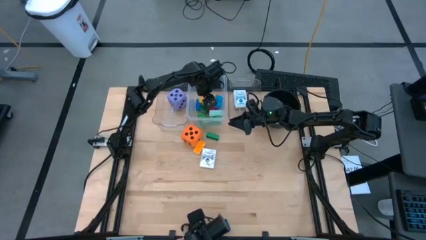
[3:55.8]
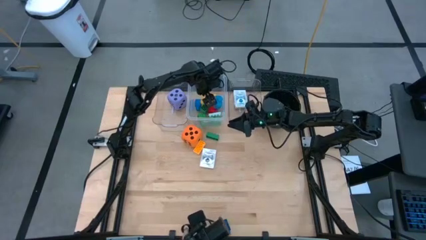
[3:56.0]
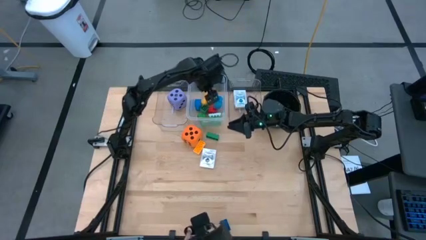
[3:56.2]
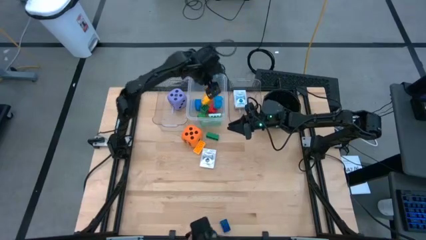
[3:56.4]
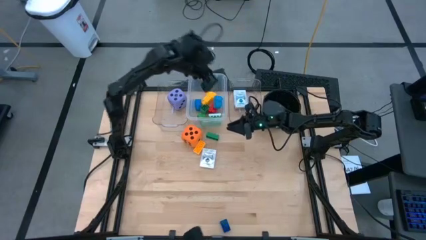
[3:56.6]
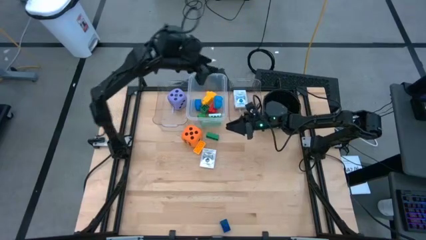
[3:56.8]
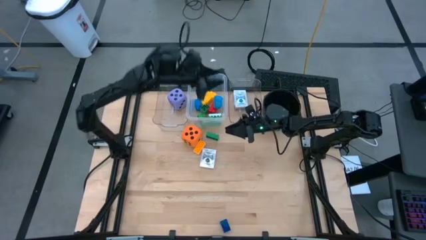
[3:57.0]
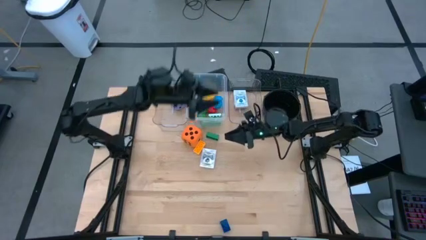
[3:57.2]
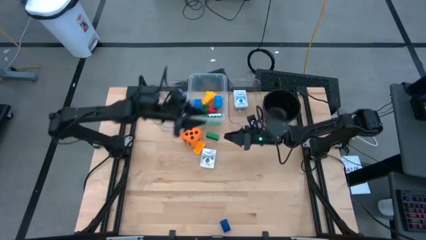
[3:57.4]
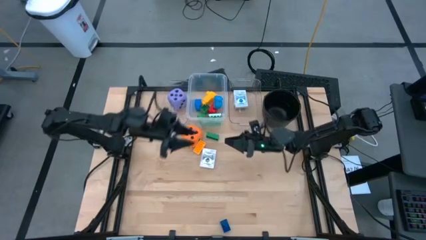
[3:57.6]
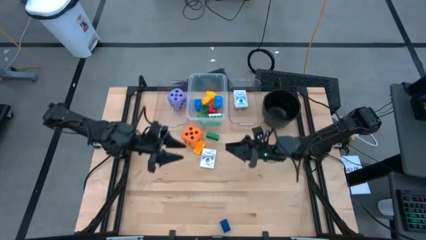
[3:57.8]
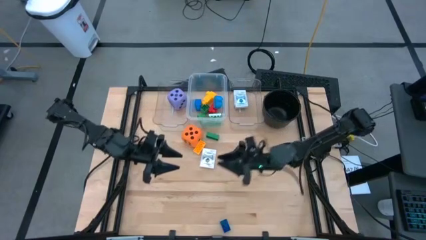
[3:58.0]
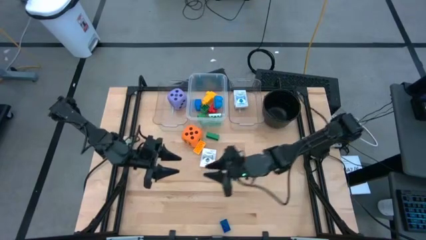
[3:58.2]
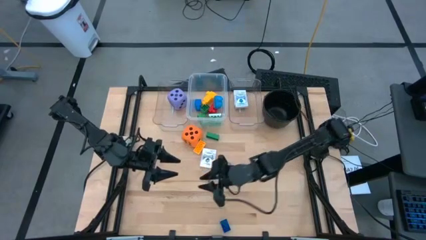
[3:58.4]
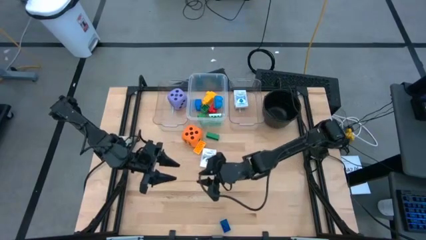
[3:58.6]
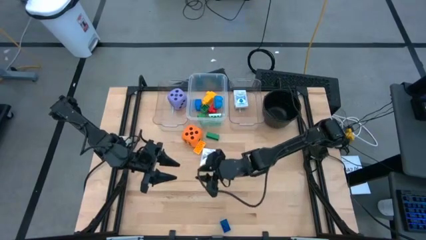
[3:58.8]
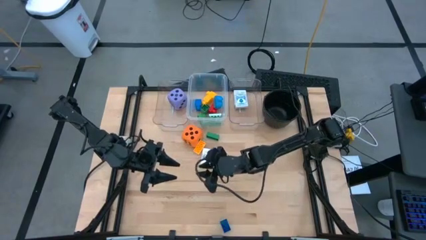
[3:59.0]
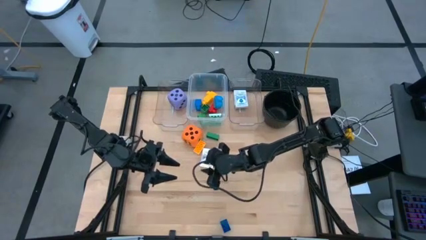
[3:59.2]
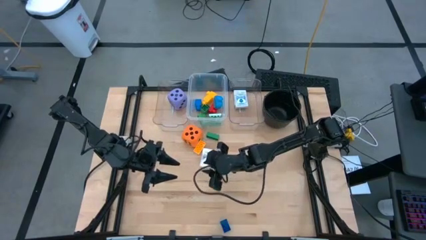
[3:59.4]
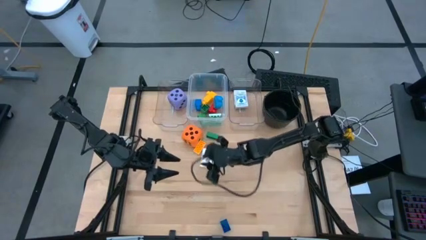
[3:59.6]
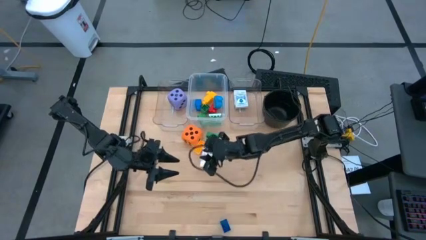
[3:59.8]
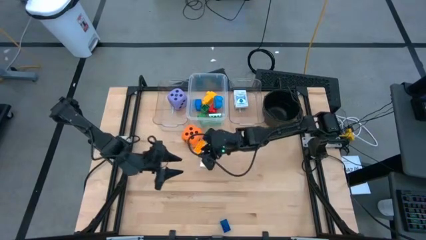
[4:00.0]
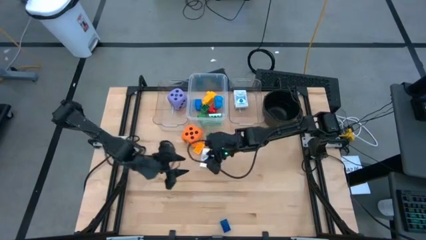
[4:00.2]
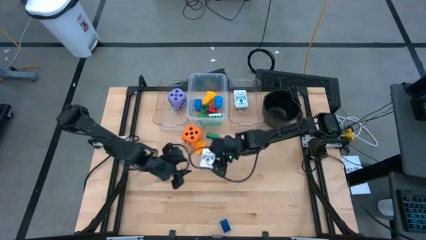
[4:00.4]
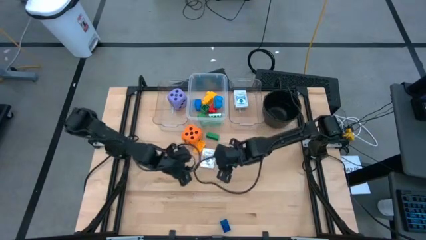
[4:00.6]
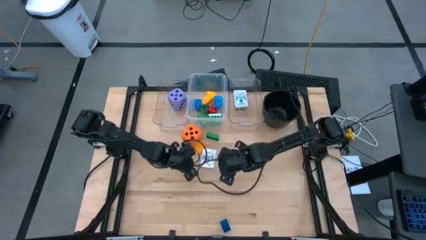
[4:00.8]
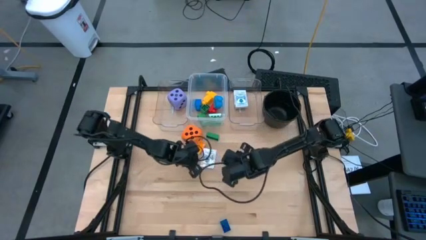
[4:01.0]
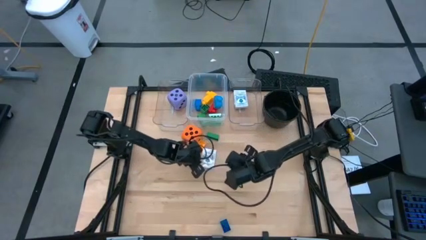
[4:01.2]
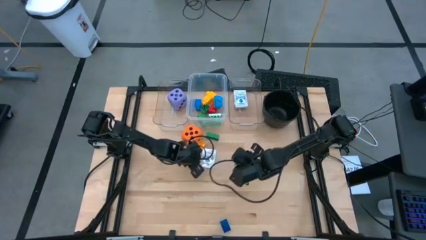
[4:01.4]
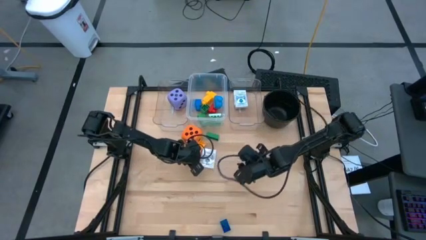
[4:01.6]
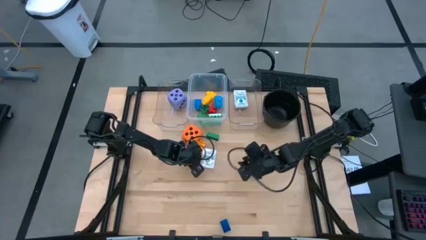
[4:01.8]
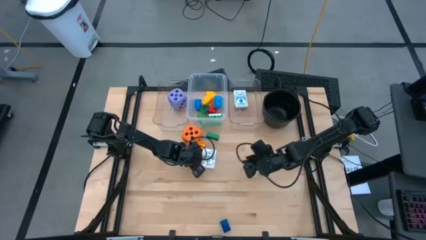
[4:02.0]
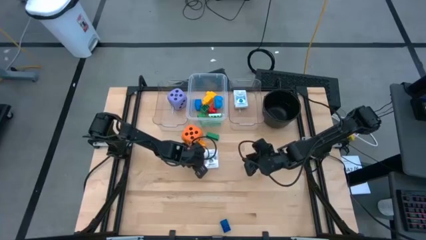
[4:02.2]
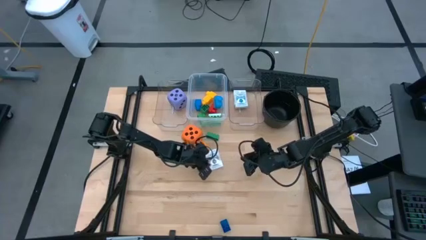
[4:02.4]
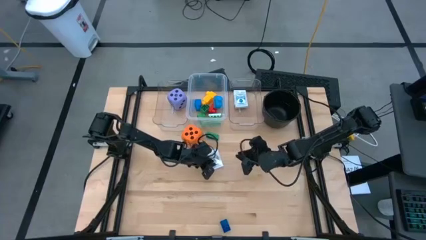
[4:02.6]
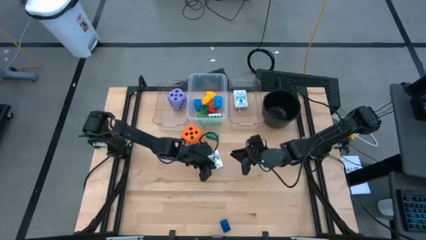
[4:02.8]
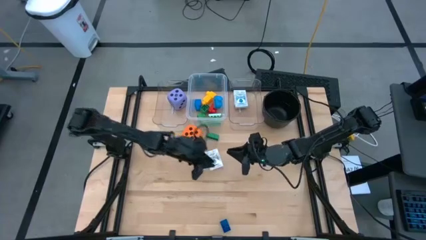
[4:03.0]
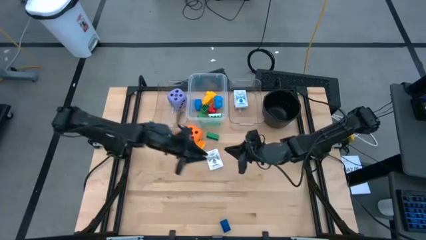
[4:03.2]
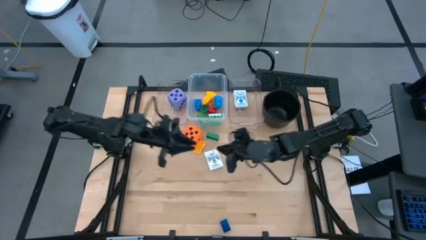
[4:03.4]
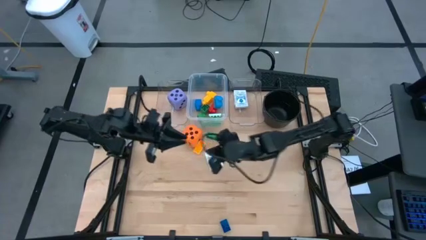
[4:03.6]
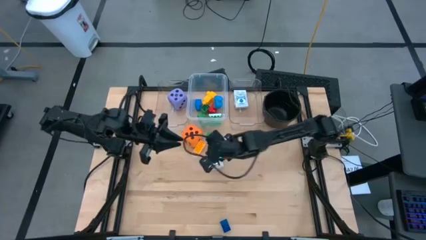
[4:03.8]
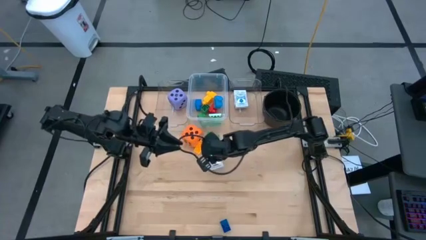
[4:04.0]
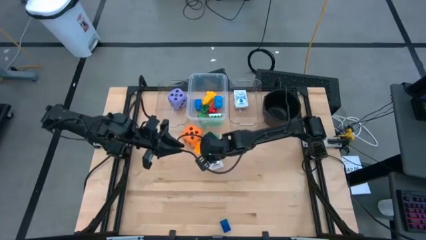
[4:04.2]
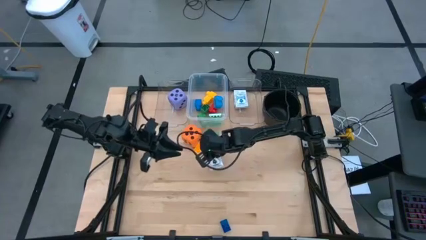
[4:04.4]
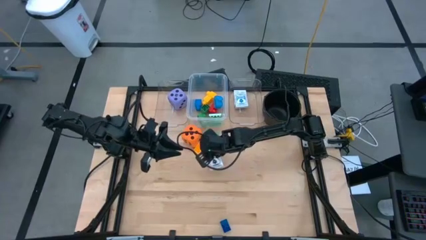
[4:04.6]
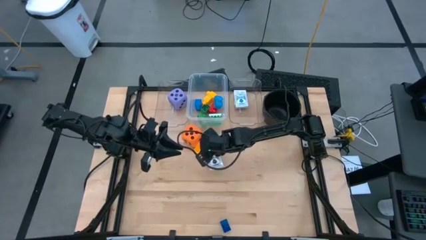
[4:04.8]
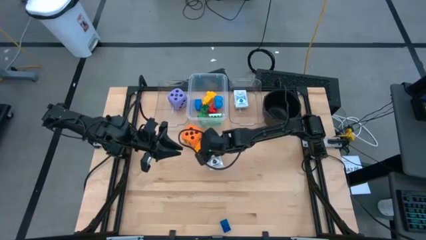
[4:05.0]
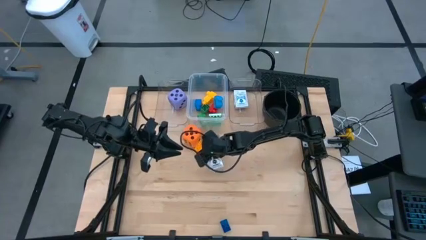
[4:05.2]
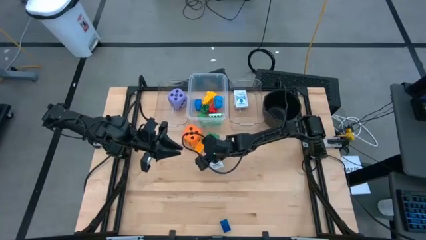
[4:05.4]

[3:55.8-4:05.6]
Task: Pick & Place Toys
Put the black playing card box into the right transparent bin

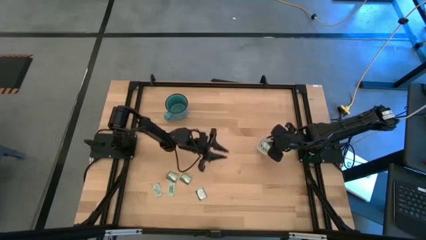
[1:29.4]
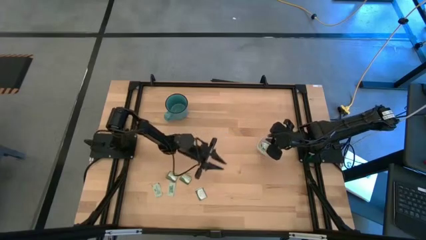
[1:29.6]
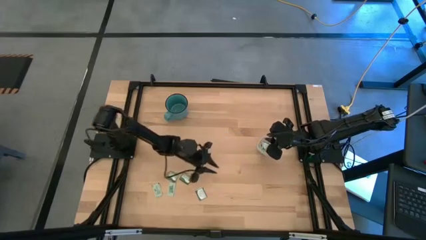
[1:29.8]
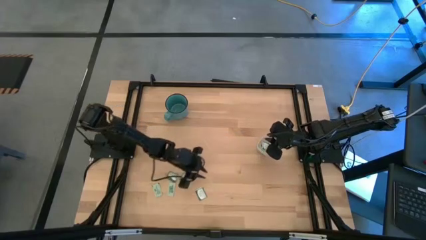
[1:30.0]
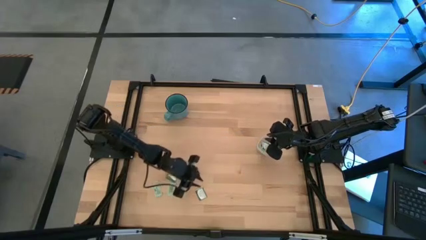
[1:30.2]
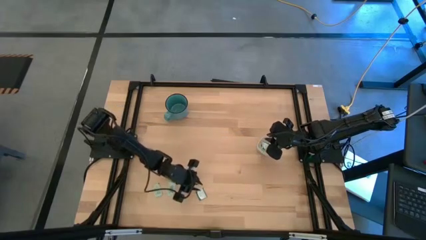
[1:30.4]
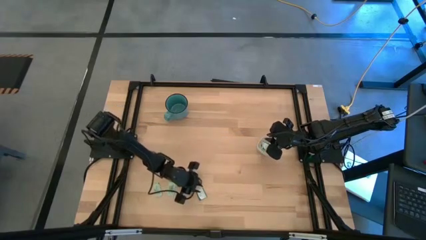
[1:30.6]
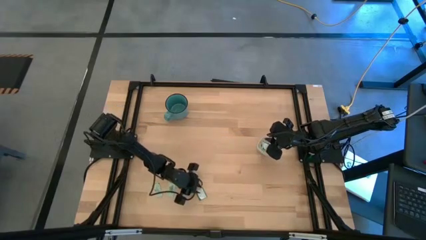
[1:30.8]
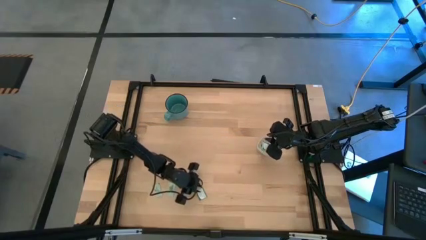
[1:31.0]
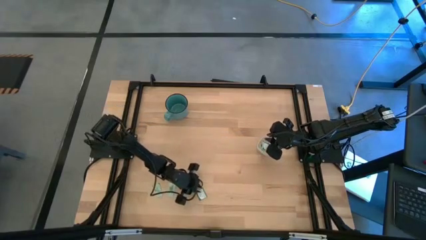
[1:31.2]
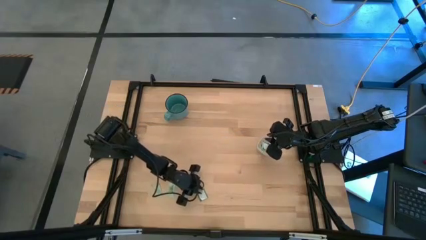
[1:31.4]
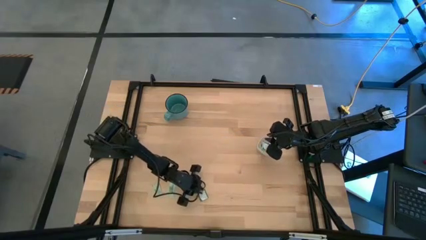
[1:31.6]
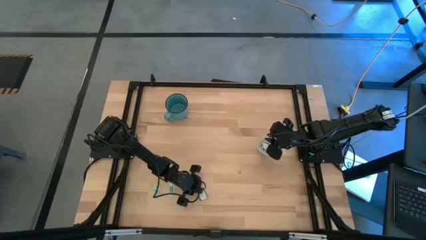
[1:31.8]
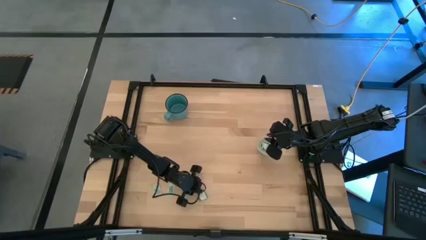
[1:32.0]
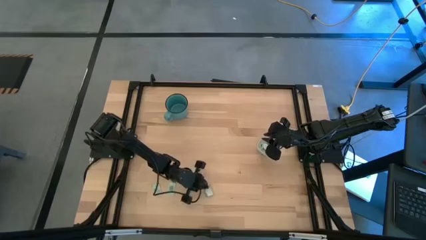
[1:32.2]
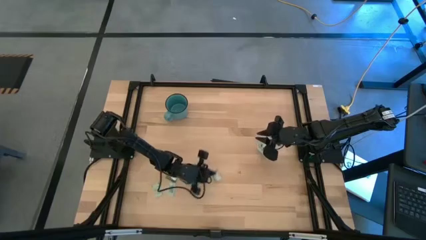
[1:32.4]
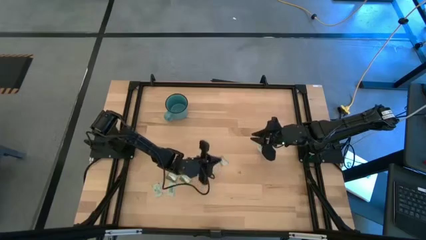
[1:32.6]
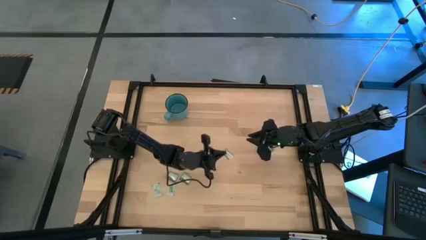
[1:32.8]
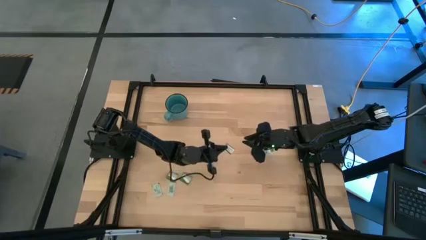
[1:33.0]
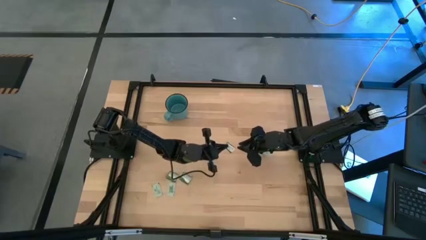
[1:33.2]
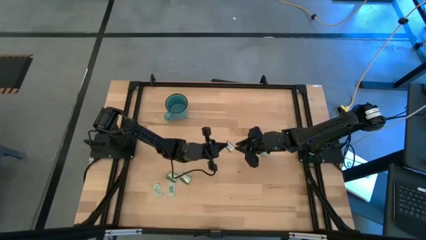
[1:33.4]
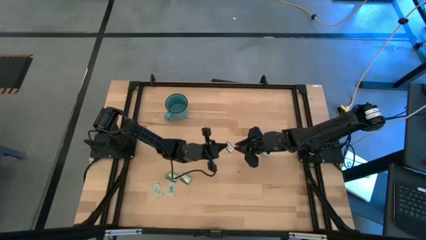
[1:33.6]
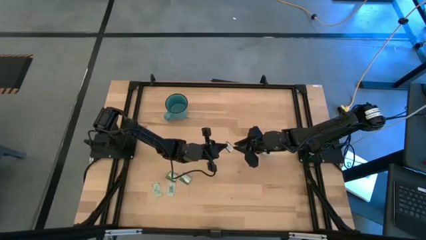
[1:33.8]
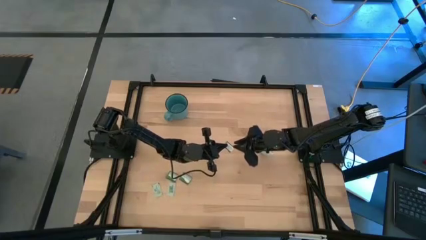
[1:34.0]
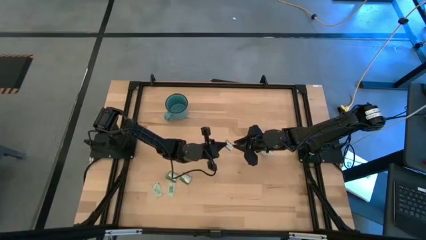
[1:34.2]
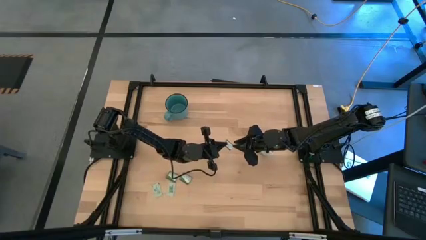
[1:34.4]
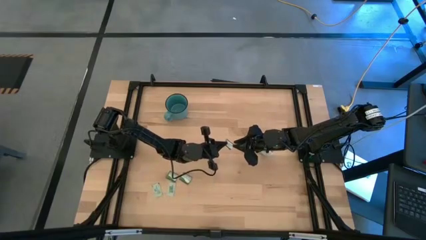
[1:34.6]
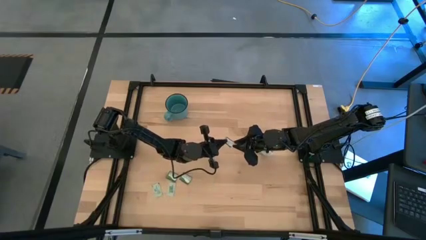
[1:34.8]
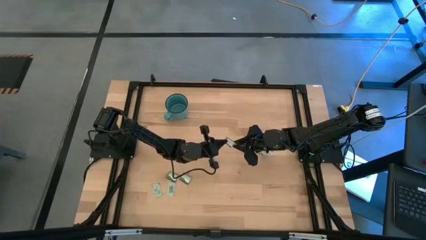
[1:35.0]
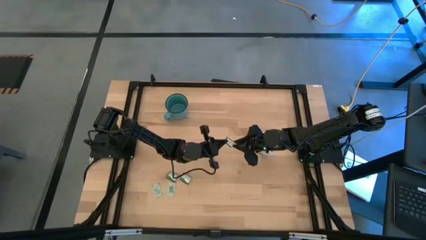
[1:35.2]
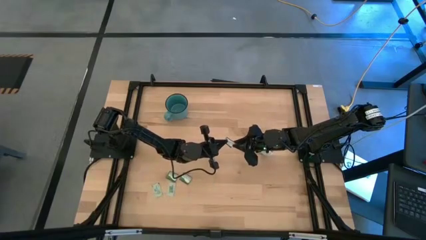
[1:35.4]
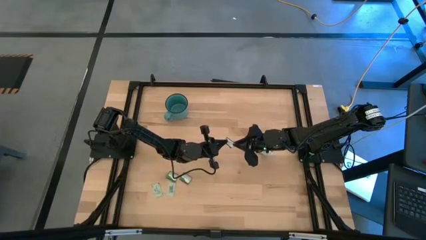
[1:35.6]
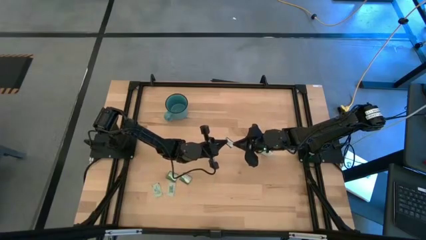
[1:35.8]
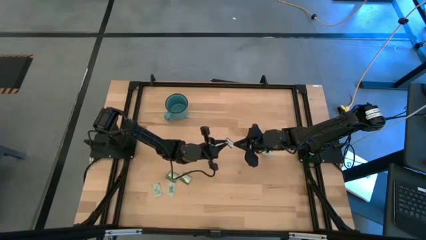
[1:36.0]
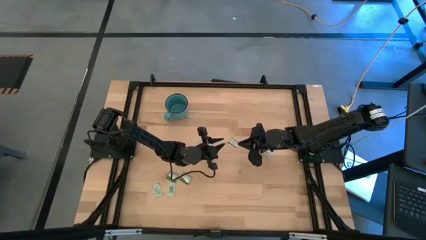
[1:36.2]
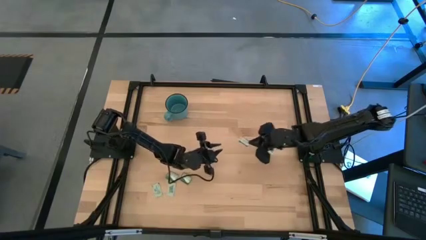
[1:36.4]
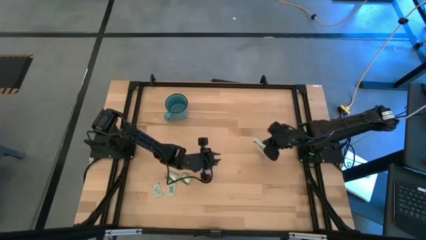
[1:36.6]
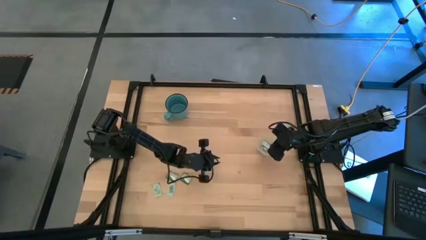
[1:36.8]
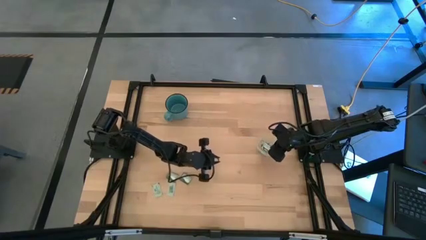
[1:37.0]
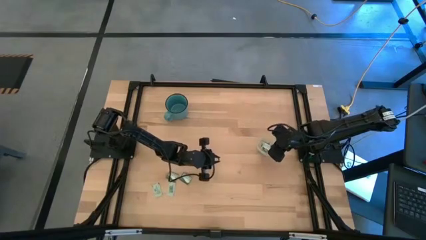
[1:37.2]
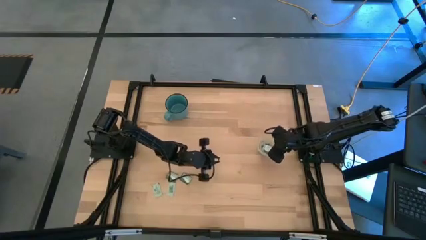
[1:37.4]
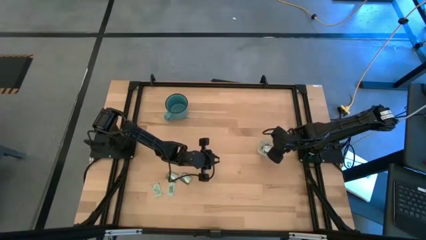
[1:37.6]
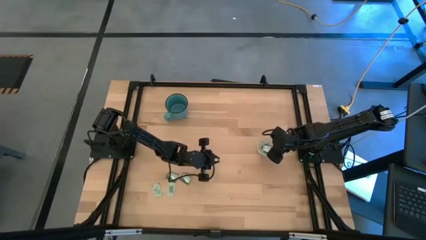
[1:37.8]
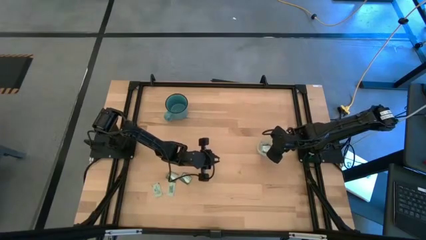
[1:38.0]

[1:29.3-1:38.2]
Task: Pick and place Stevia / Truvia into bins
Put the truvia packet into the transparent bin
